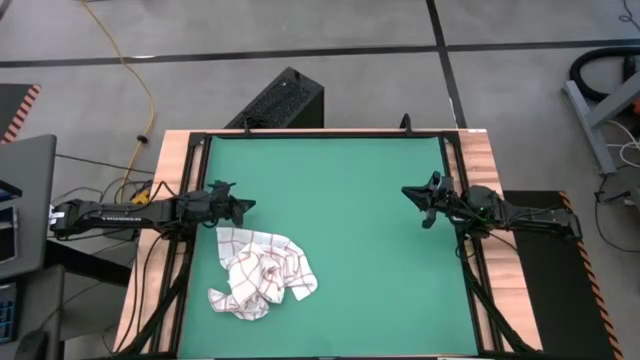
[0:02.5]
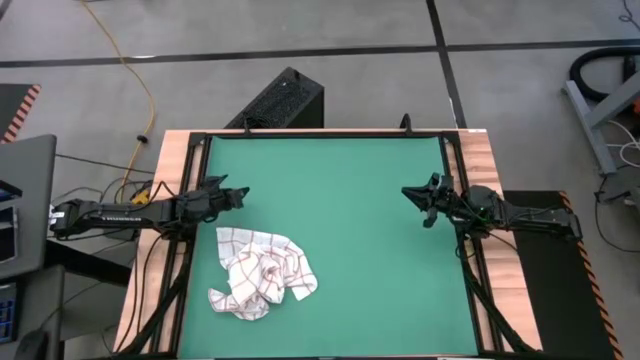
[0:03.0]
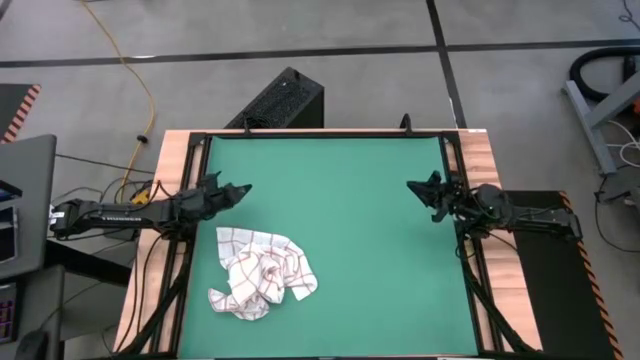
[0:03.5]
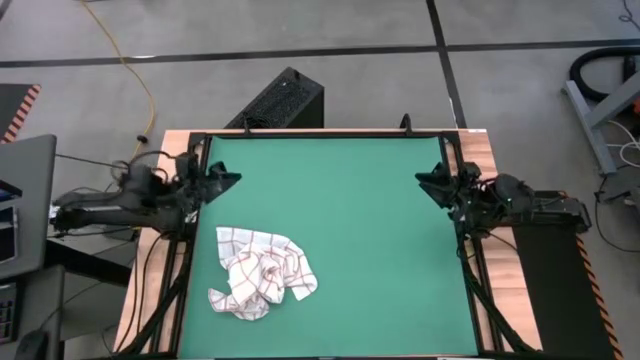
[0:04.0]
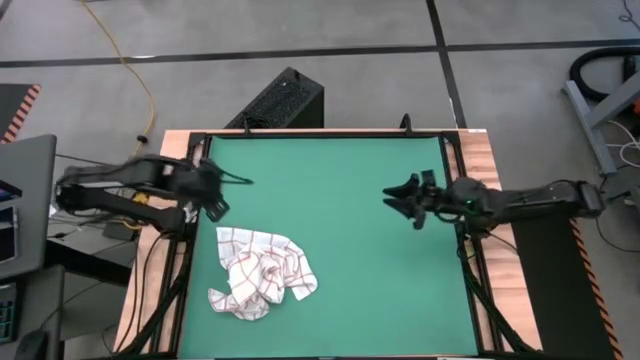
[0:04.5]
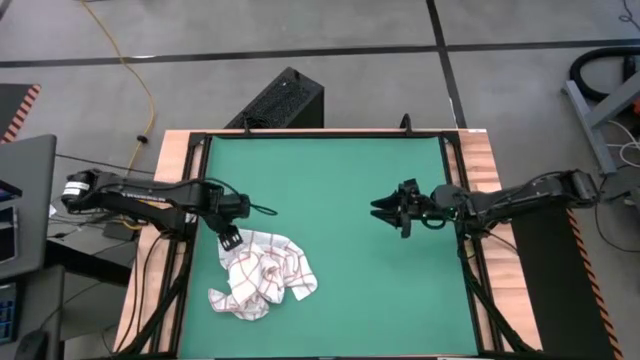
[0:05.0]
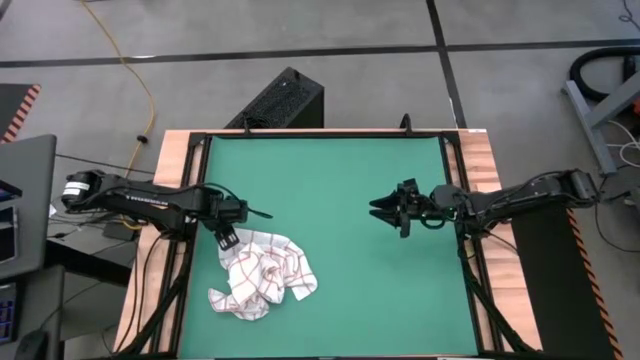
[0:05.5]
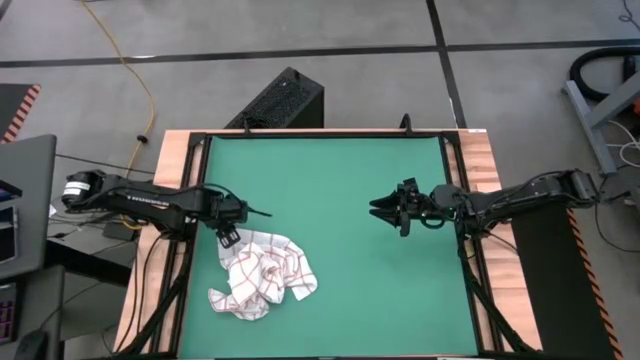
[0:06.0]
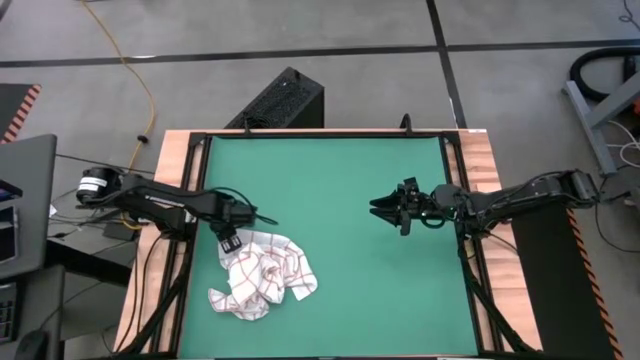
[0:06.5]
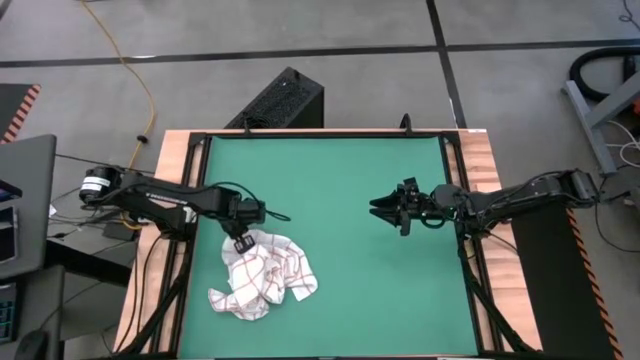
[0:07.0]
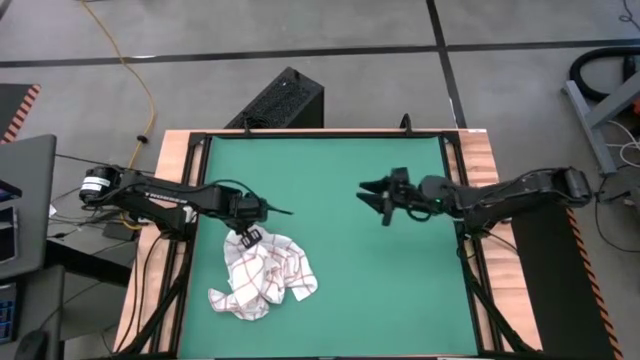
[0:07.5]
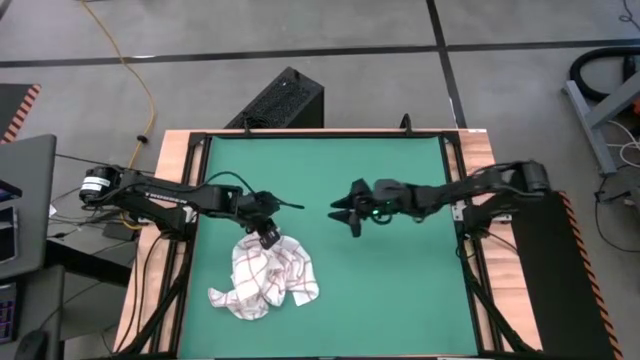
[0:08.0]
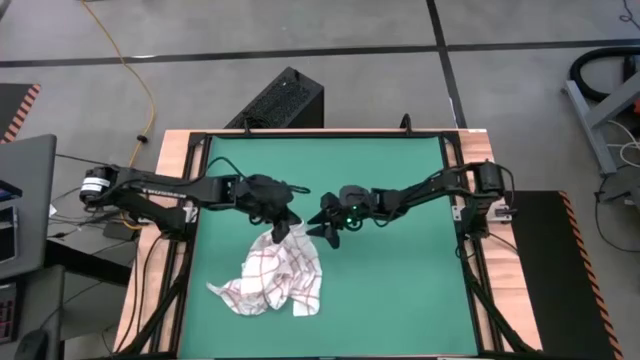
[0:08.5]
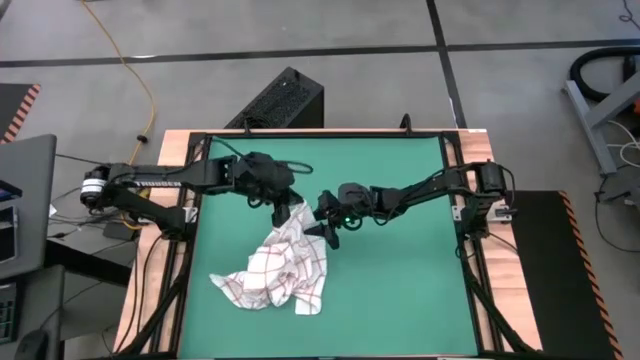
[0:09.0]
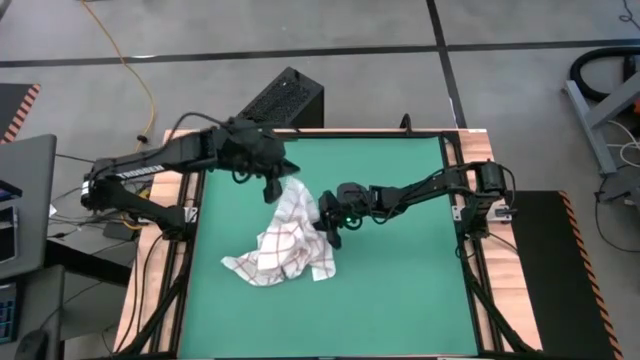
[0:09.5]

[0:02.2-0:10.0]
Task: Roll towel
Roll the white towel

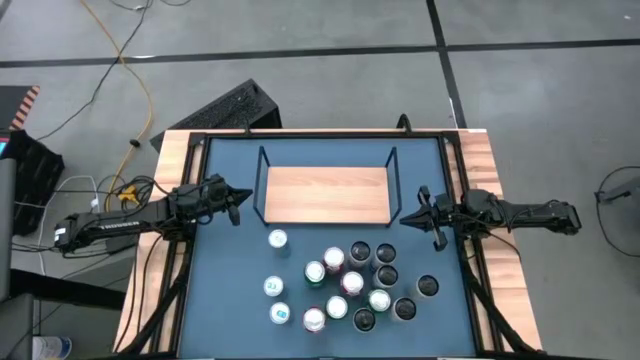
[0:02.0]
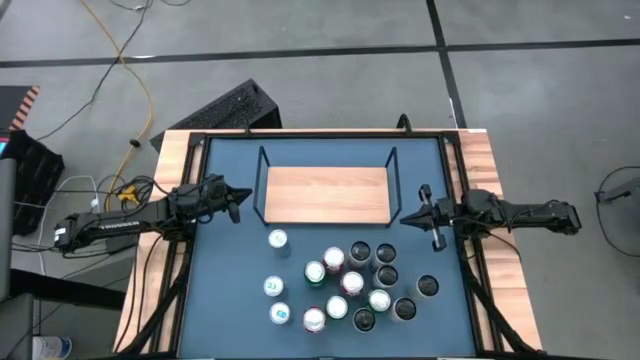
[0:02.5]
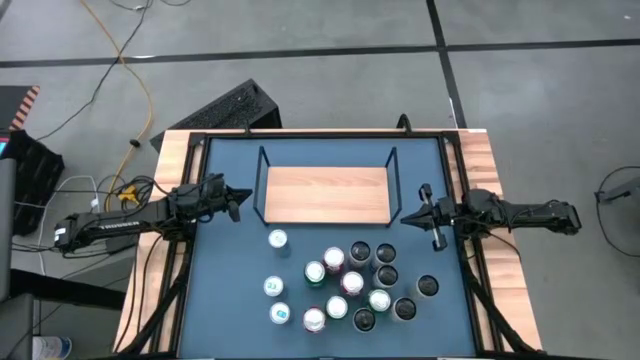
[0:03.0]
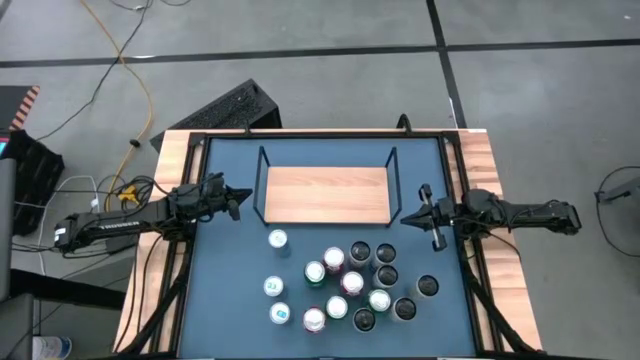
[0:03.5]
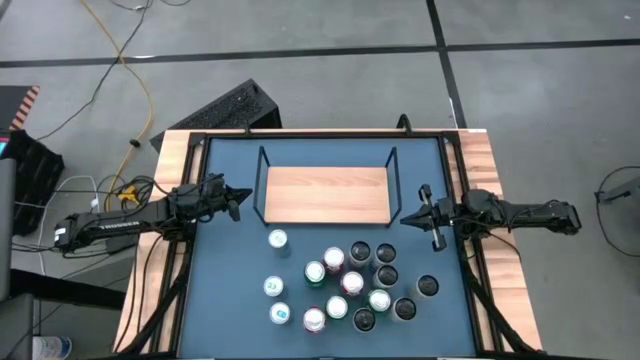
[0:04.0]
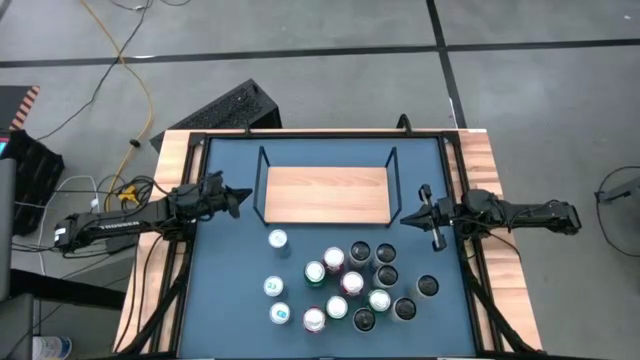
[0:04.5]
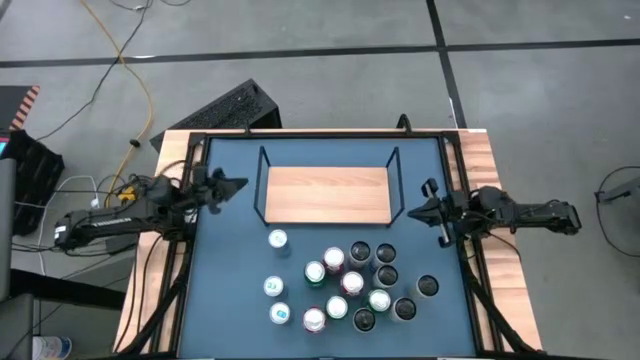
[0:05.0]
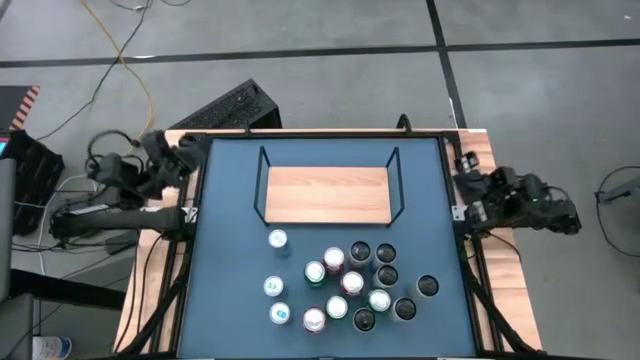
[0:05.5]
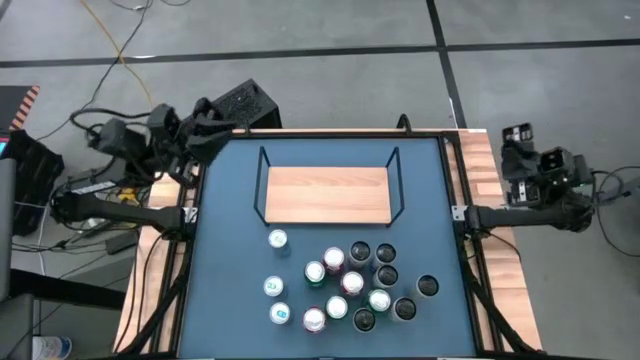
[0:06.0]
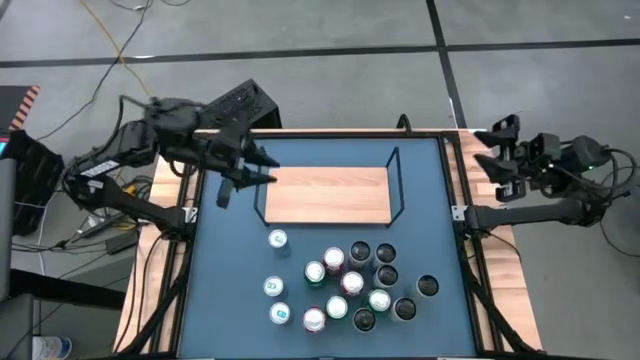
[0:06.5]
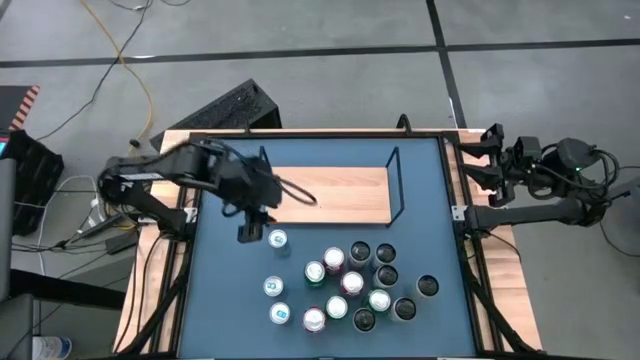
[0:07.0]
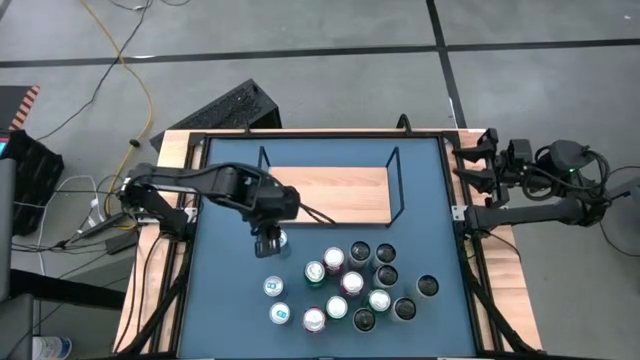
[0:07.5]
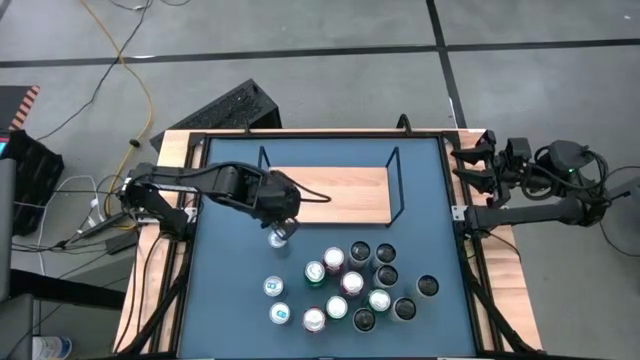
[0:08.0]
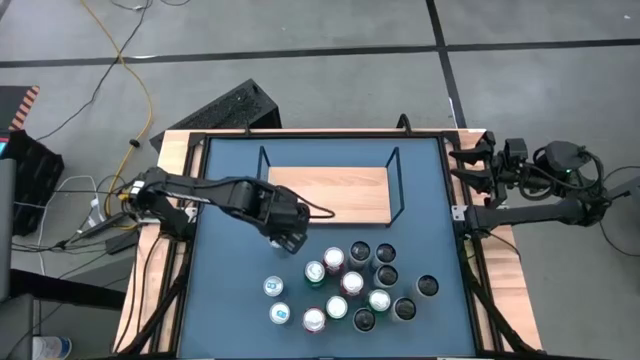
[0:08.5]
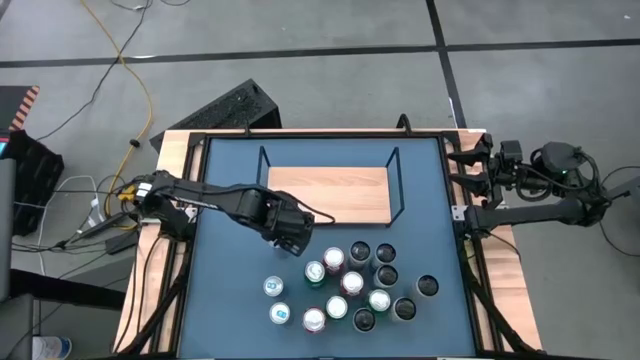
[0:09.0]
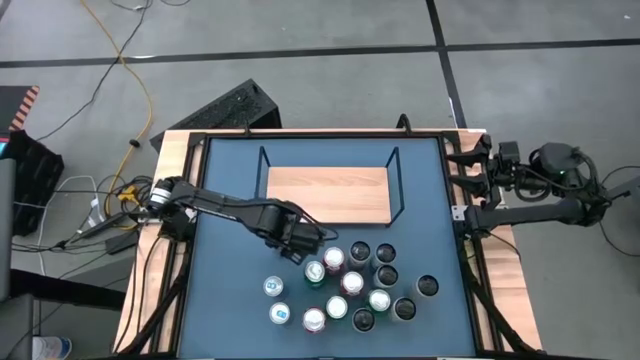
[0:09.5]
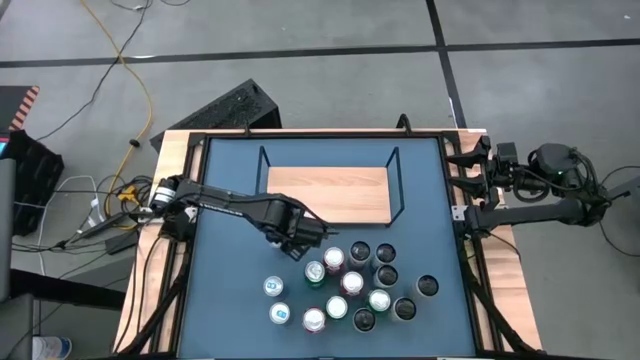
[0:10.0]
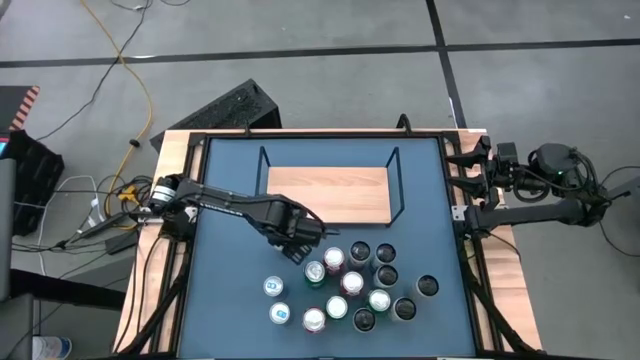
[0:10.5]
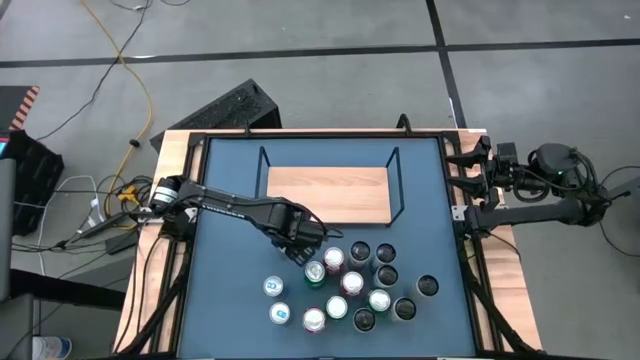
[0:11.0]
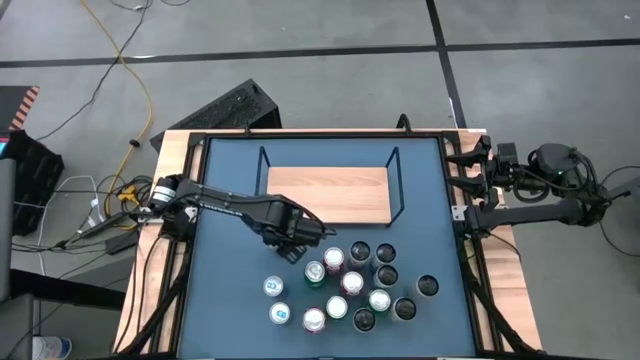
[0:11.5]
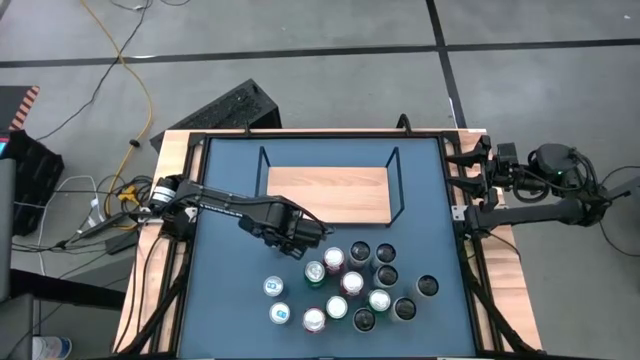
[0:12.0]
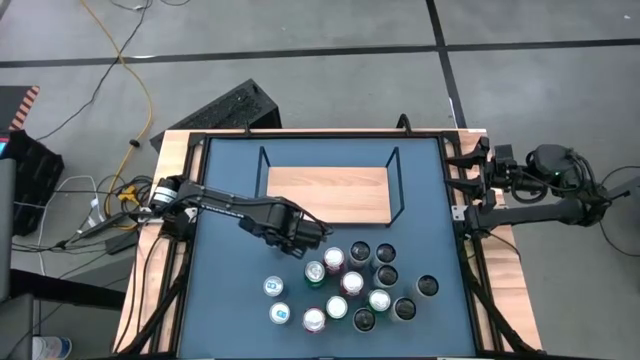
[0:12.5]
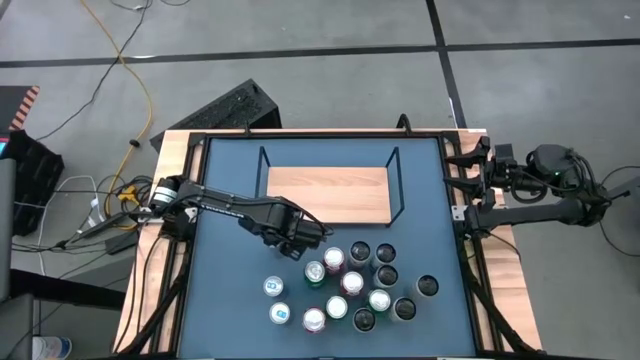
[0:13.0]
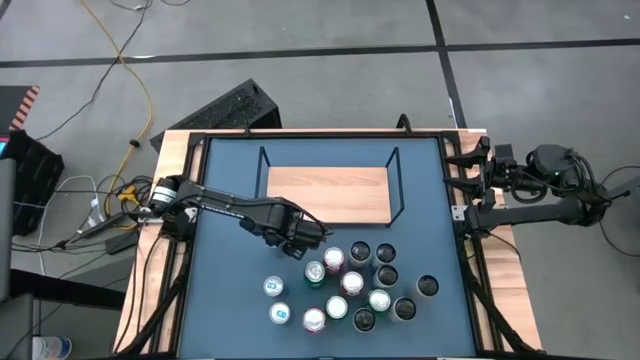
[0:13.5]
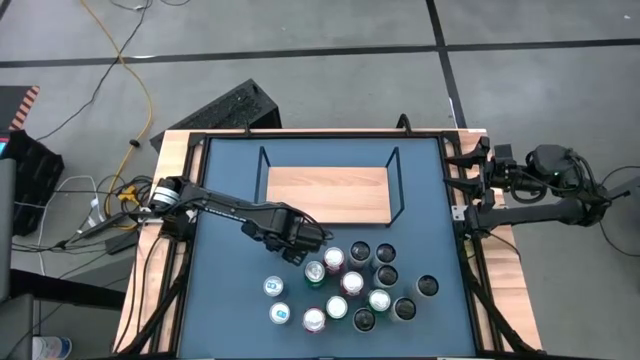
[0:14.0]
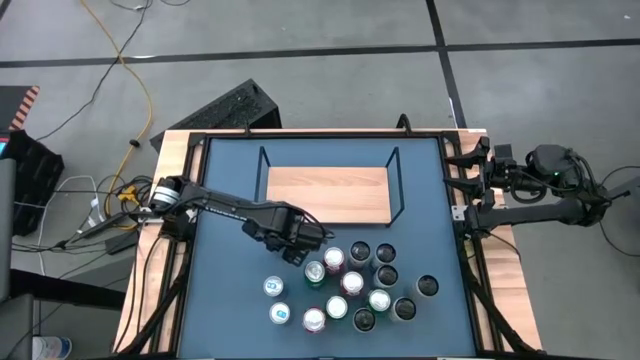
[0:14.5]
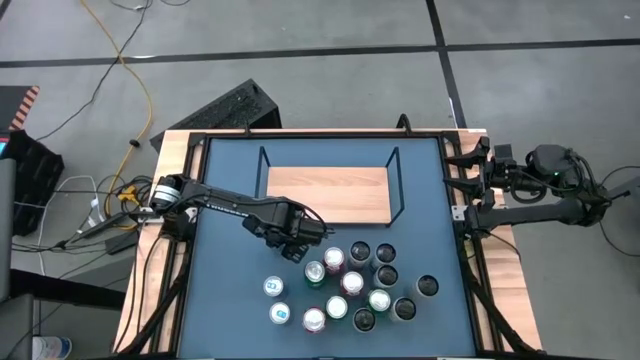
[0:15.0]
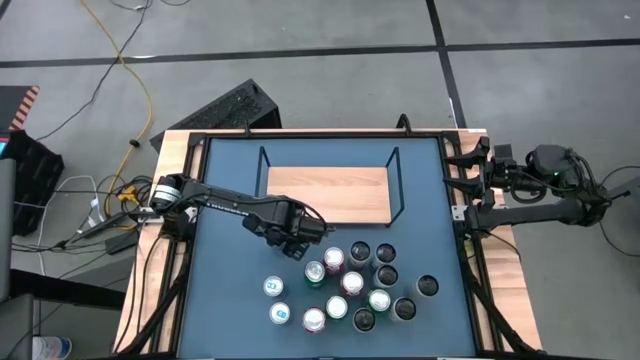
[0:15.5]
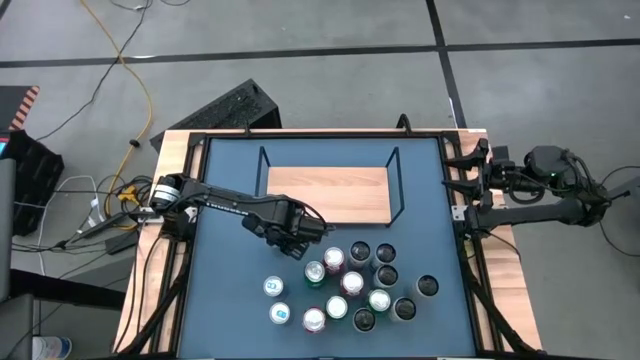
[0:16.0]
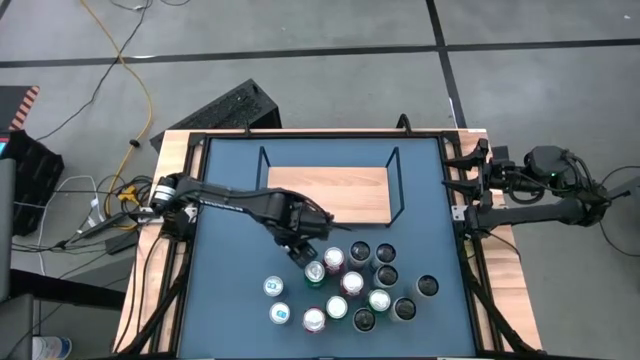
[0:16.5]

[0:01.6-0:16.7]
Task: Place canned beverage on shelf
Put the top blue soda can on the shelf
